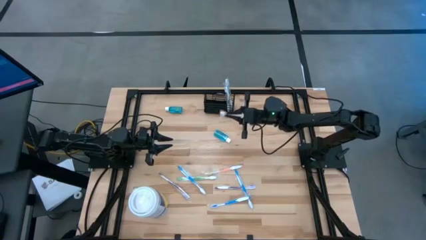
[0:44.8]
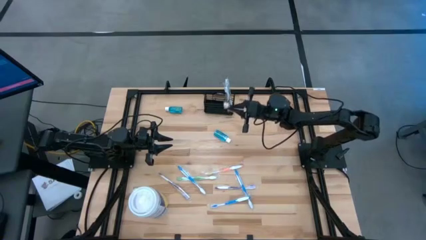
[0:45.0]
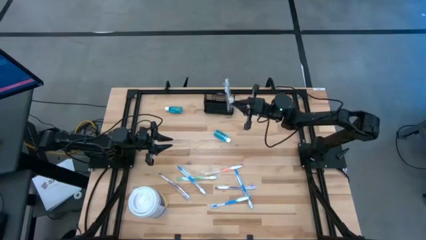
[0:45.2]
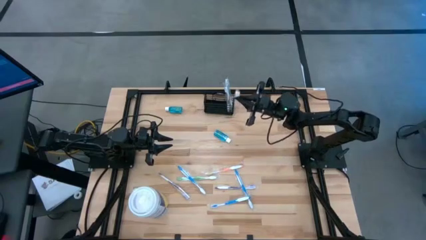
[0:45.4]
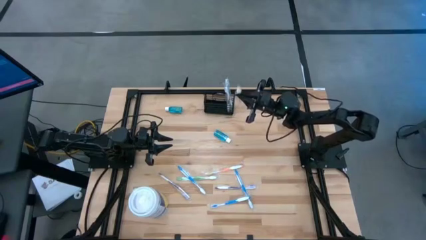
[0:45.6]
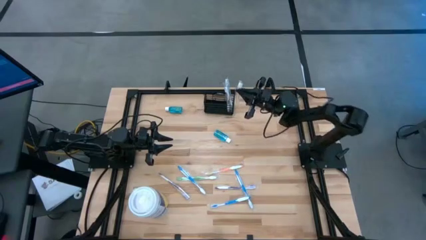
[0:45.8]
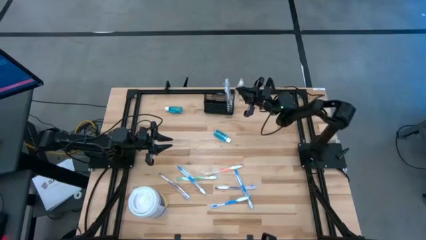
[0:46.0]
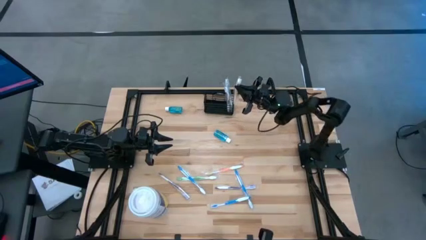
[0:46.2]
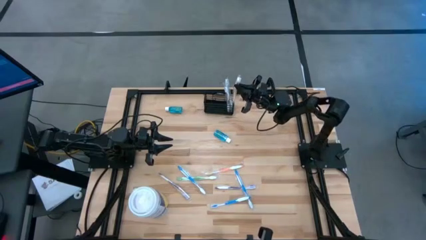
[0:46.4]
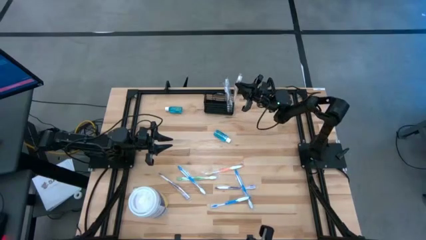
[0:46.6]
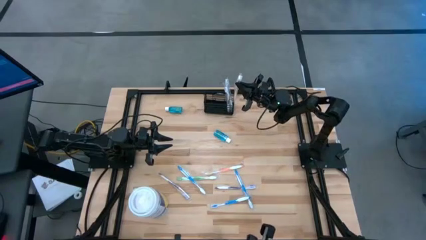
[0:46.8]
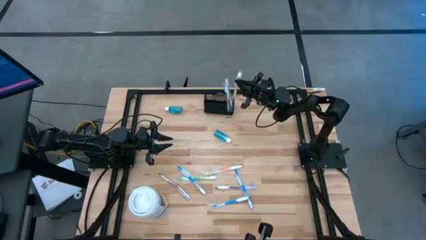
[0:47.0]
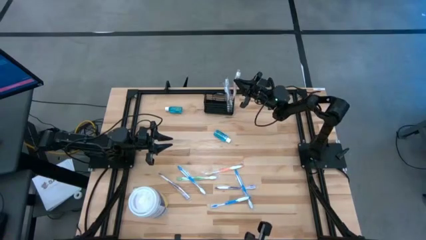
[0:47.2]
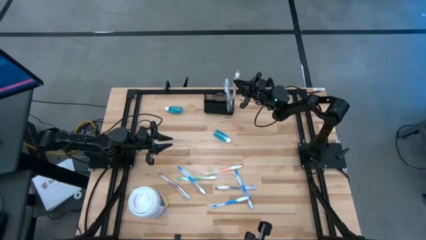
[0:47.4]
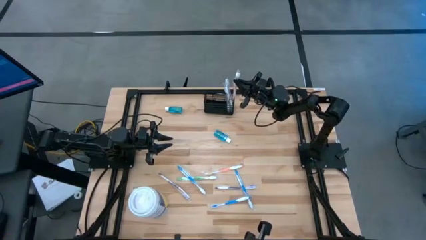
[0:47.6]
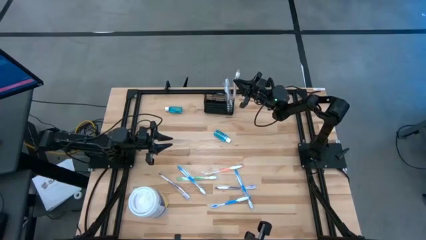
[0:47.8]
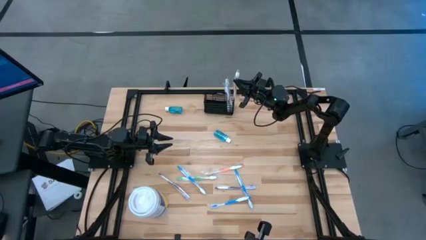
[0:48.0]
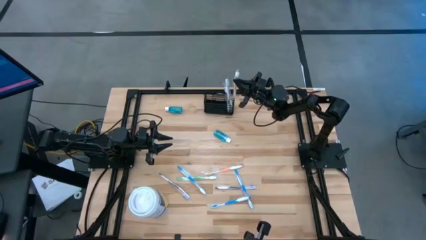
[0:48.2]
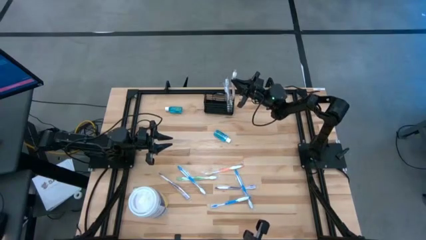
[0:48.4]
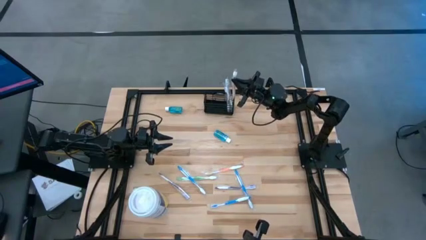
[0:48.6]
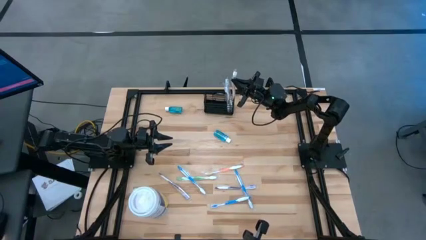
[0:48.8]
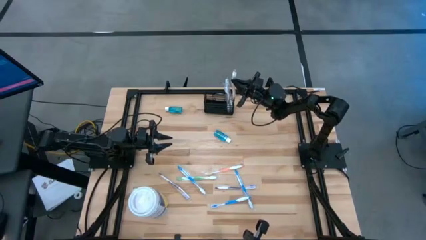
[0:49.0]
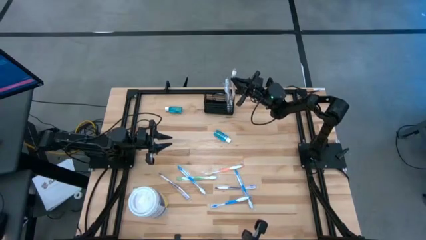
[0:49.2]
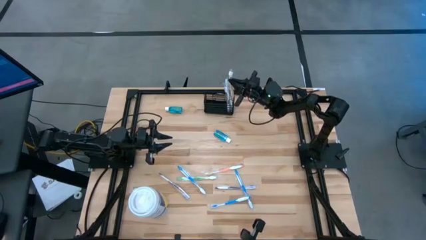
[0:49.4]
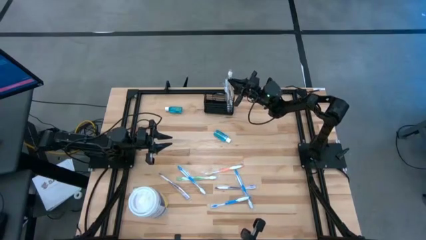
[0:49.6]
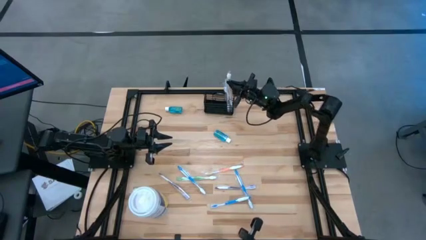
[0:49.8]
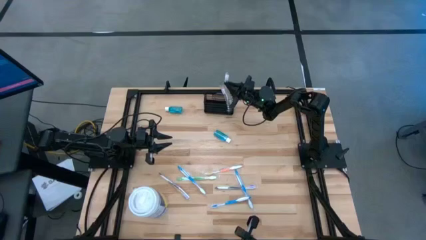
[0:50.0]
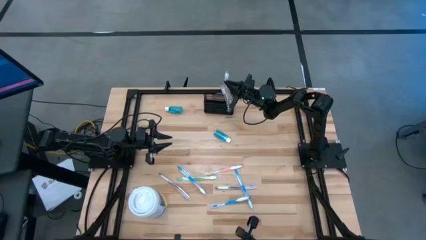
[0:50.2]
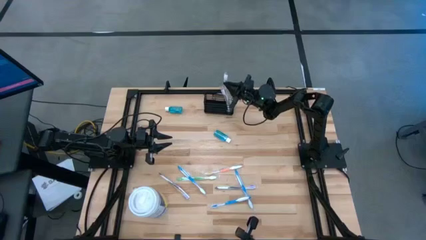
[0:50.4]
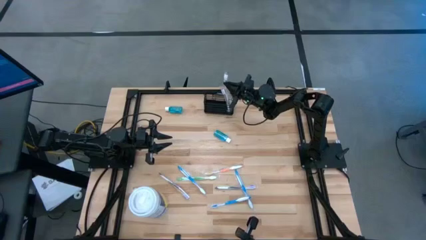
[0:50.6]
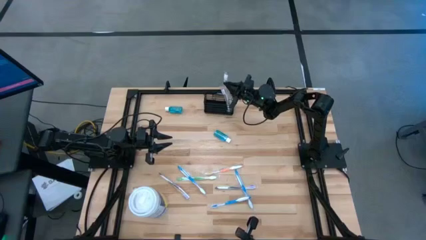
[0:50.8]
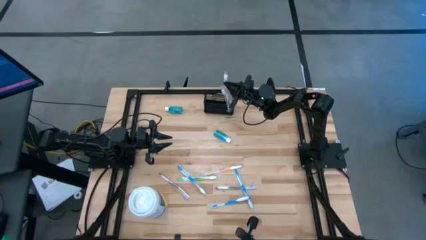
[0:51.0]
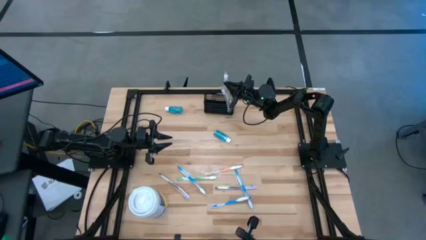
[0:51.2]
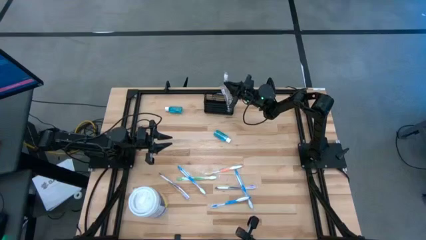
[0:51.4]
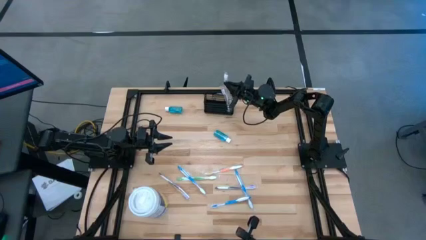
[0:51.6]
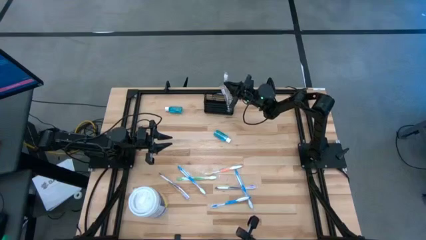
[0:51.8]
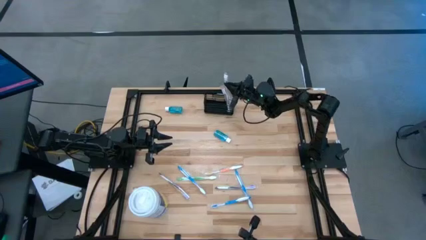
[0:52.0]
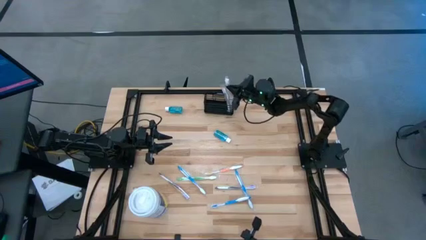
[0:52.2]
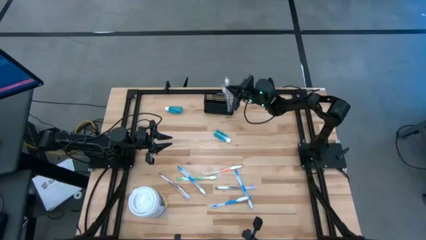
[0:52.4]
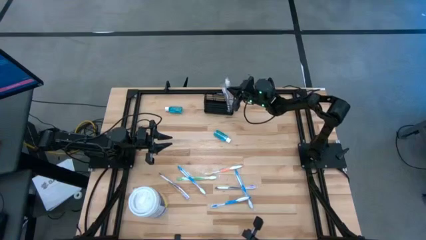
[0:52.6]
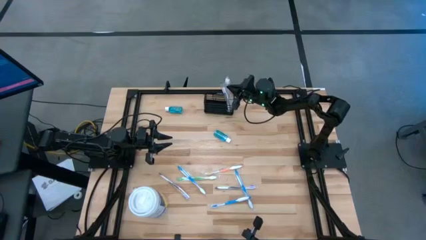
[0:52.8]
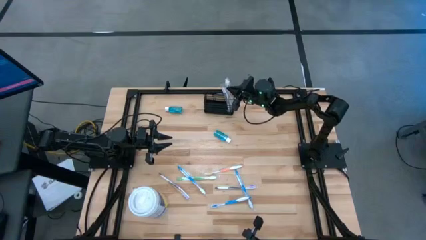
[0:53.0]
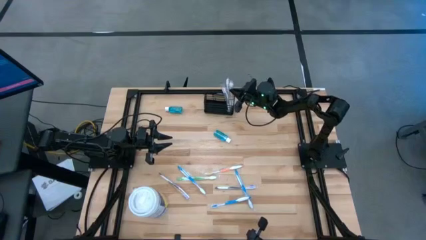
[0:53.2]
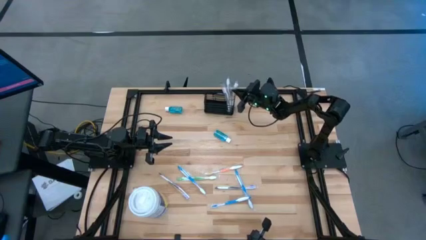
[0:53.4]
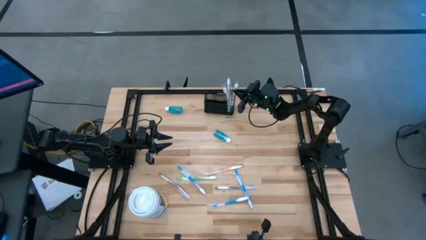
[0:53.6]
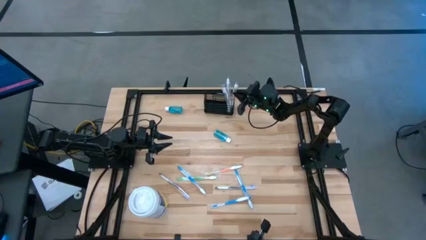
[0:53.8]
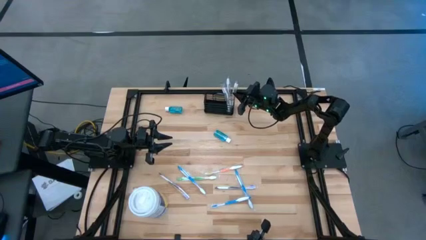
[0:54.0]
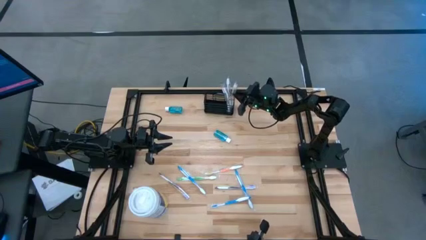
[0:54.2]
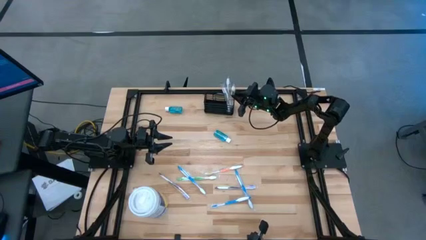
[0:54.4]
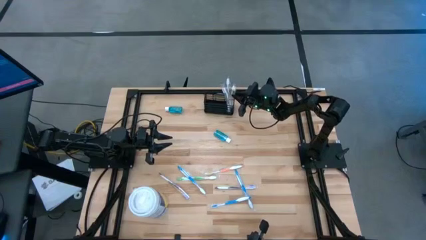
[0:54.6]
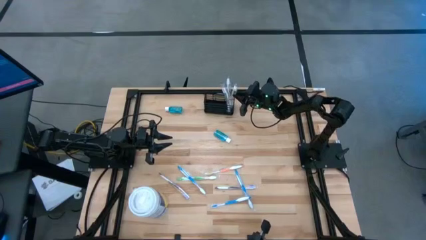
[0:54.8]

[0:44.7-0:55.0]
Task: Pick & Place toothbrushing station
Put the orange toothbrush into the mesh organizer
